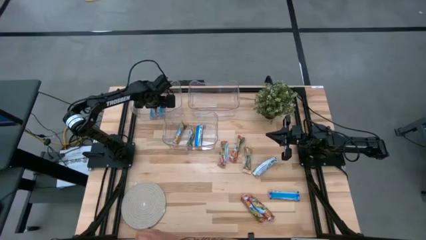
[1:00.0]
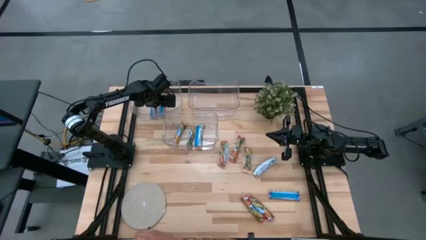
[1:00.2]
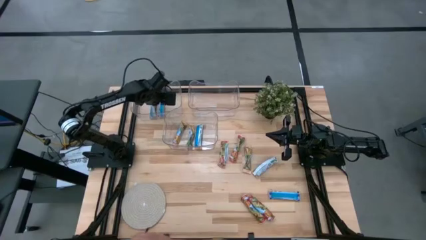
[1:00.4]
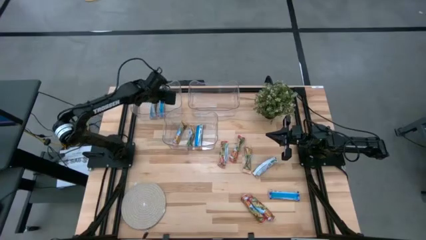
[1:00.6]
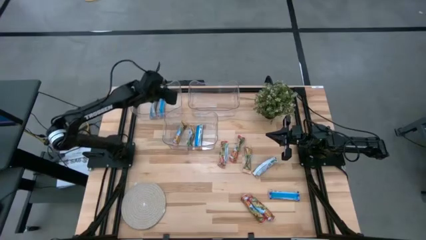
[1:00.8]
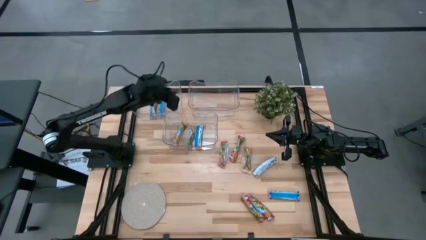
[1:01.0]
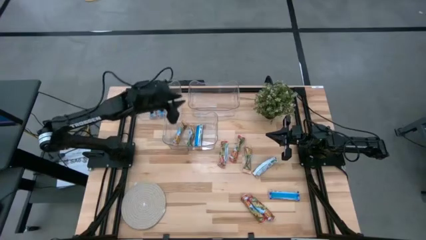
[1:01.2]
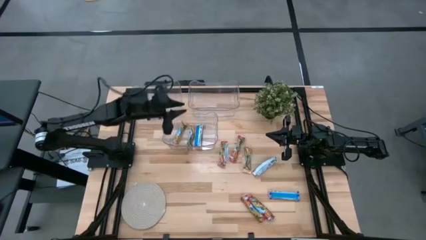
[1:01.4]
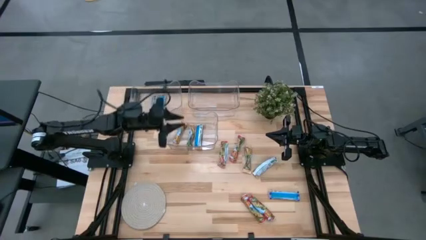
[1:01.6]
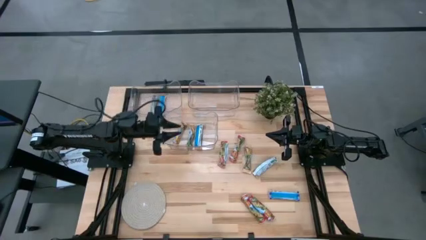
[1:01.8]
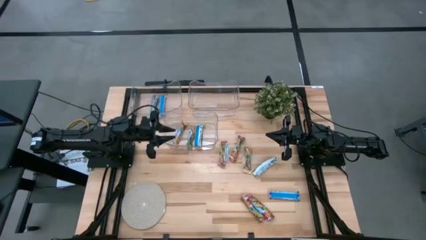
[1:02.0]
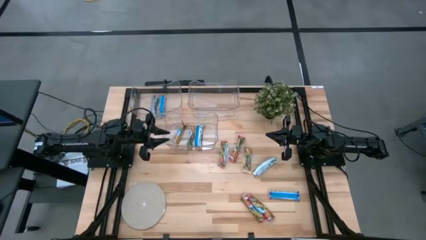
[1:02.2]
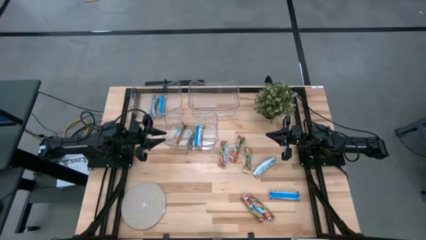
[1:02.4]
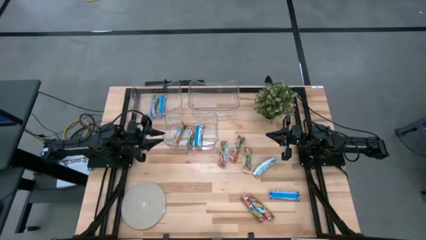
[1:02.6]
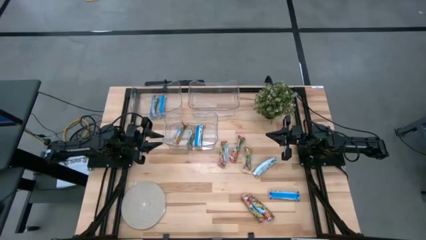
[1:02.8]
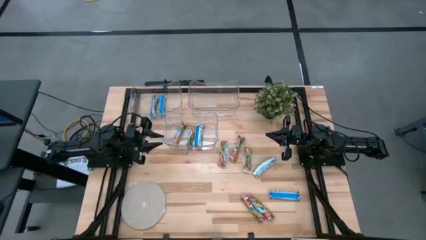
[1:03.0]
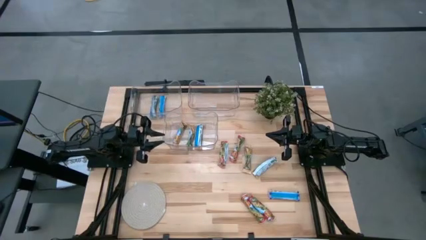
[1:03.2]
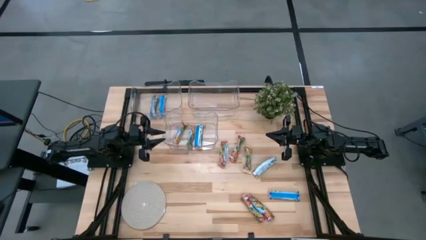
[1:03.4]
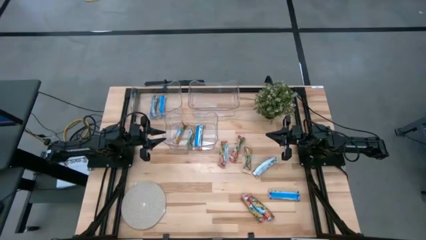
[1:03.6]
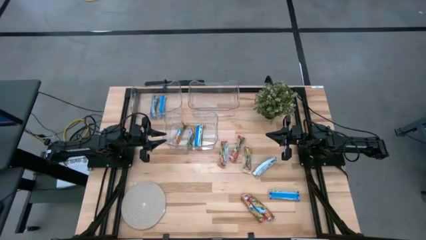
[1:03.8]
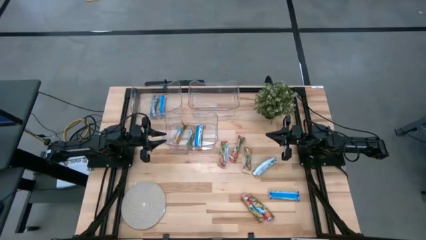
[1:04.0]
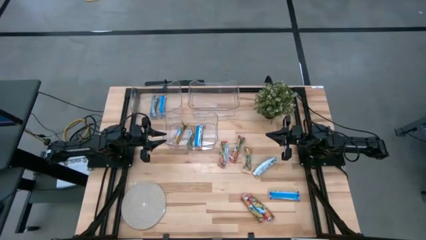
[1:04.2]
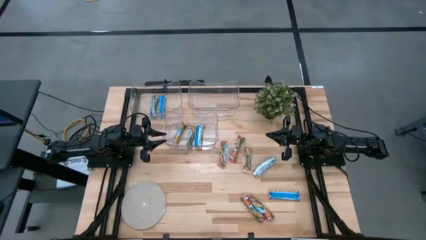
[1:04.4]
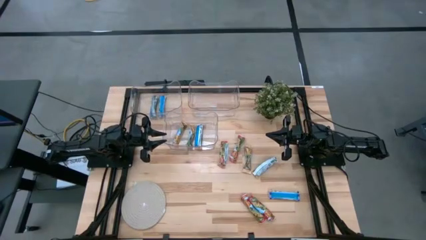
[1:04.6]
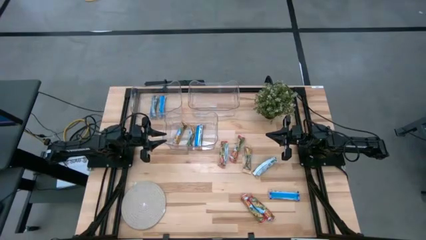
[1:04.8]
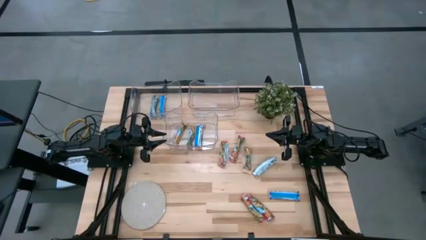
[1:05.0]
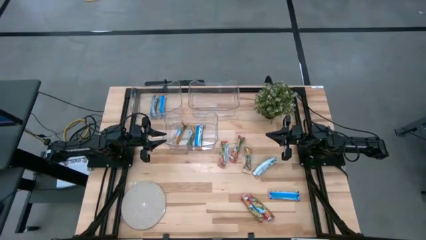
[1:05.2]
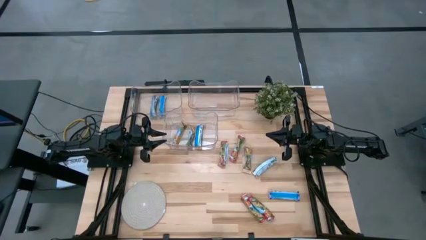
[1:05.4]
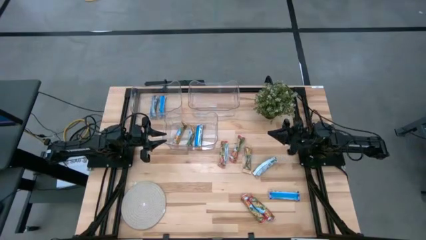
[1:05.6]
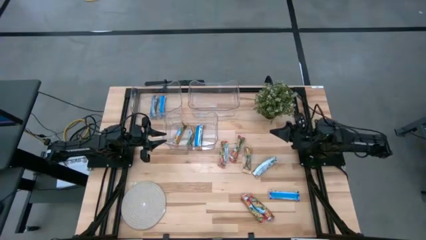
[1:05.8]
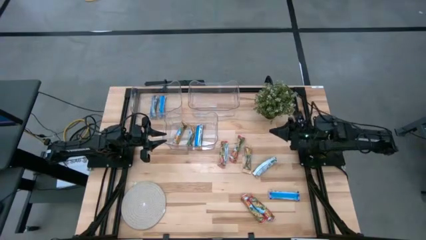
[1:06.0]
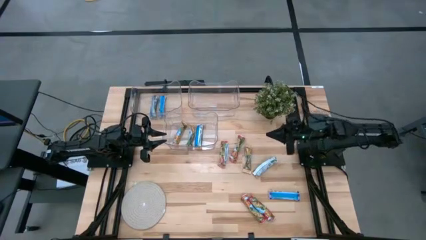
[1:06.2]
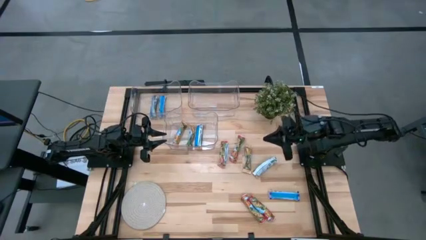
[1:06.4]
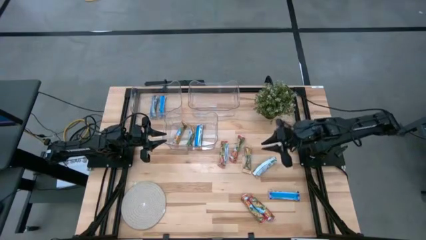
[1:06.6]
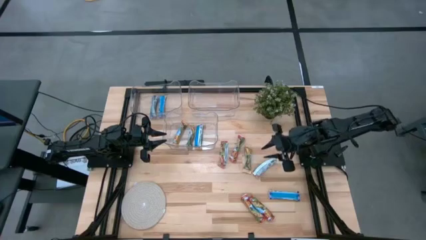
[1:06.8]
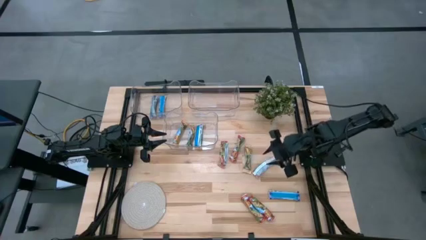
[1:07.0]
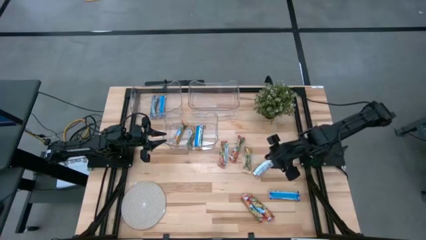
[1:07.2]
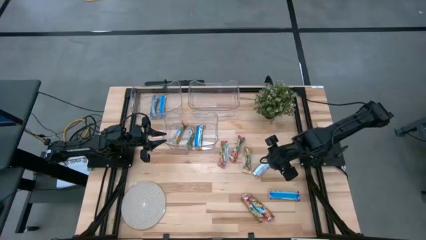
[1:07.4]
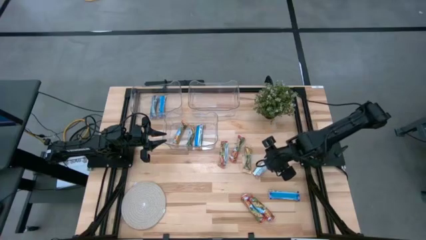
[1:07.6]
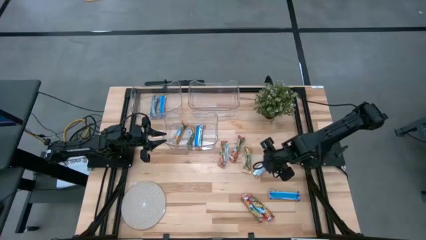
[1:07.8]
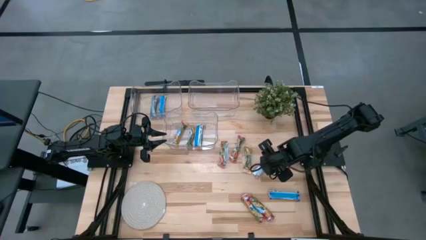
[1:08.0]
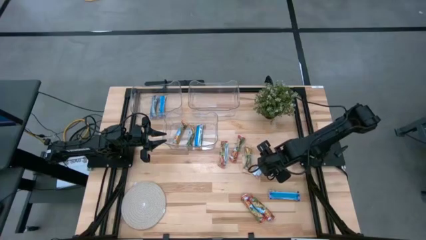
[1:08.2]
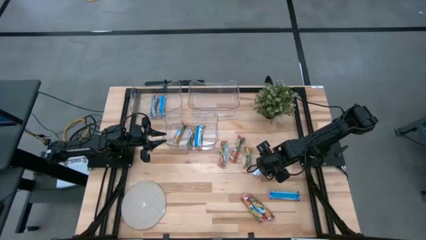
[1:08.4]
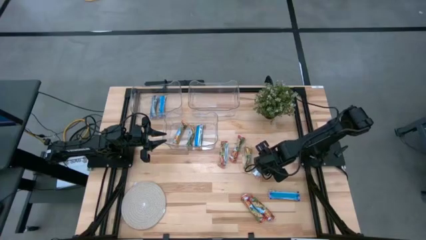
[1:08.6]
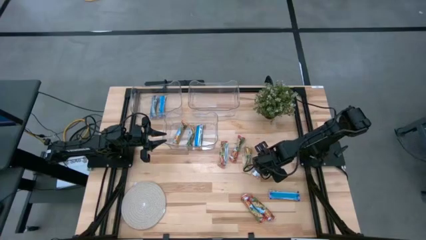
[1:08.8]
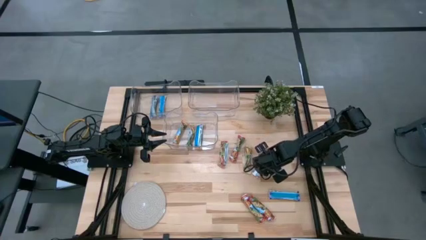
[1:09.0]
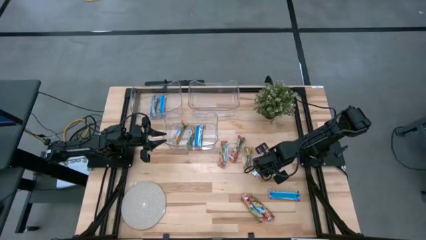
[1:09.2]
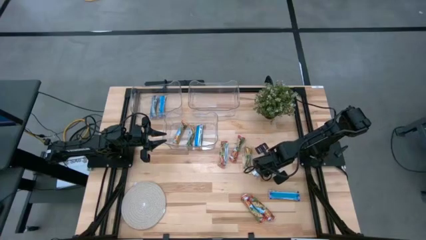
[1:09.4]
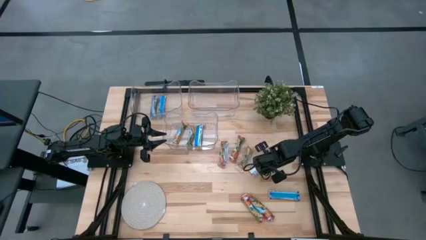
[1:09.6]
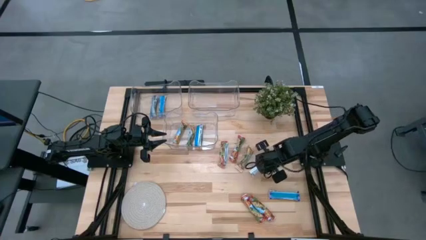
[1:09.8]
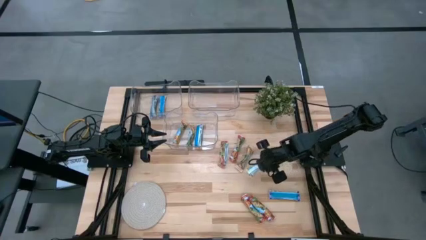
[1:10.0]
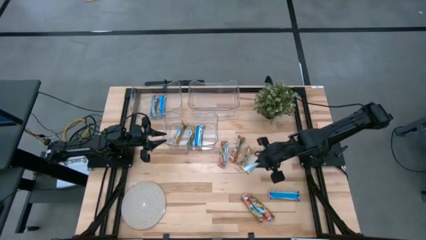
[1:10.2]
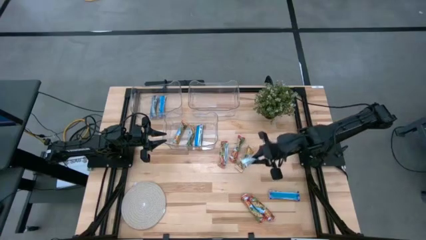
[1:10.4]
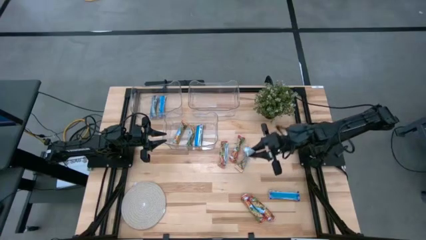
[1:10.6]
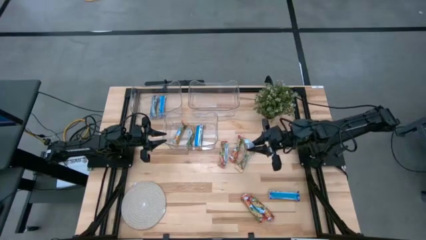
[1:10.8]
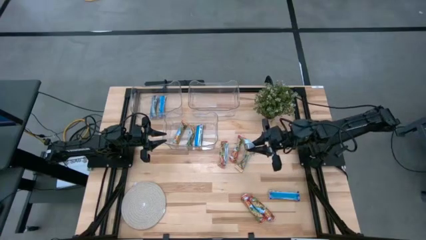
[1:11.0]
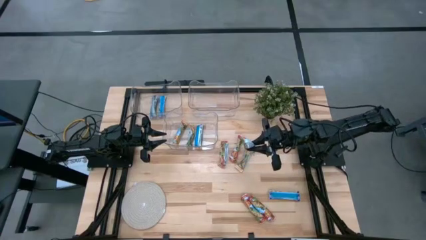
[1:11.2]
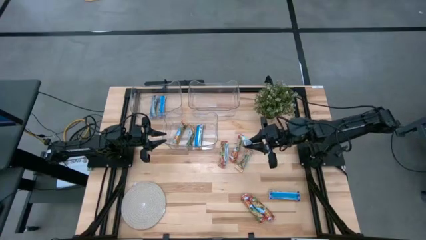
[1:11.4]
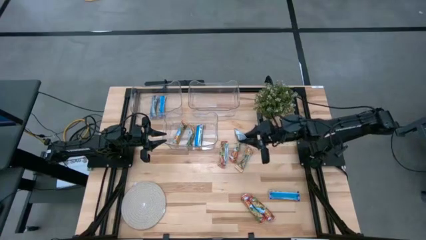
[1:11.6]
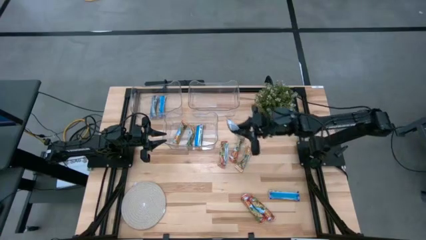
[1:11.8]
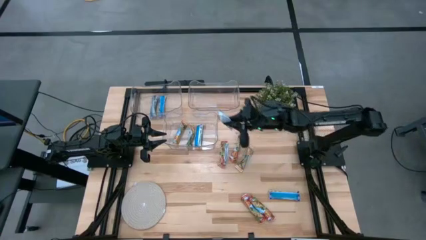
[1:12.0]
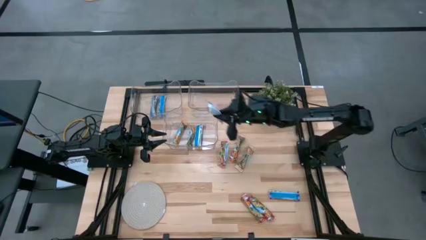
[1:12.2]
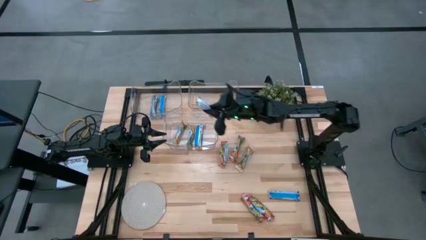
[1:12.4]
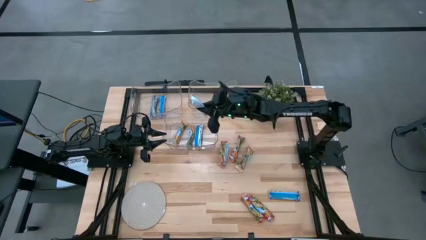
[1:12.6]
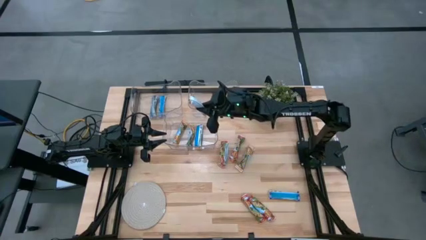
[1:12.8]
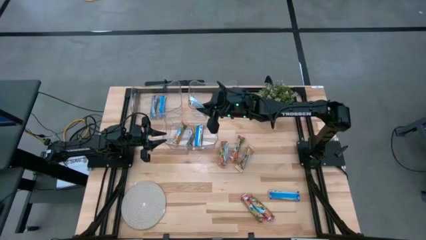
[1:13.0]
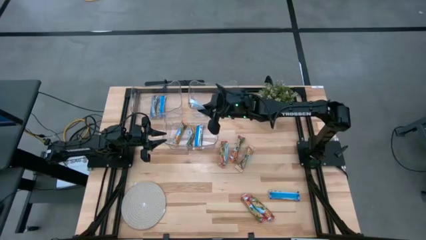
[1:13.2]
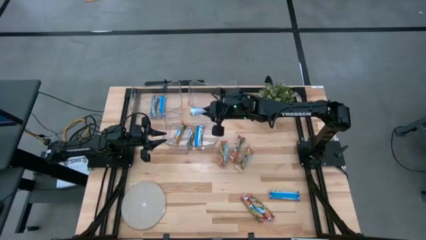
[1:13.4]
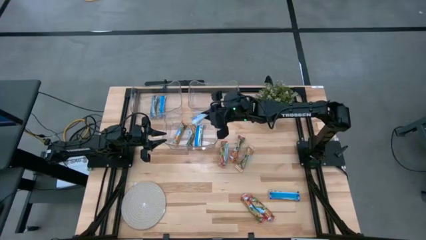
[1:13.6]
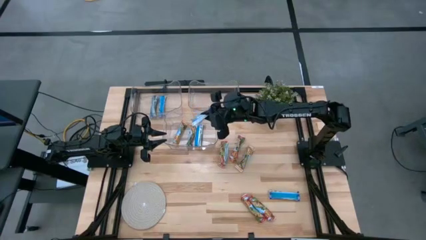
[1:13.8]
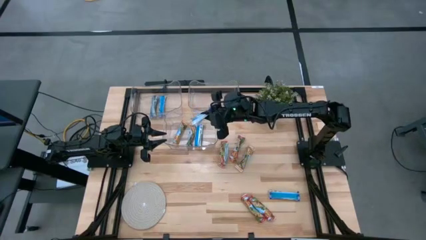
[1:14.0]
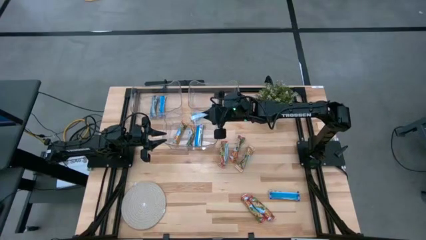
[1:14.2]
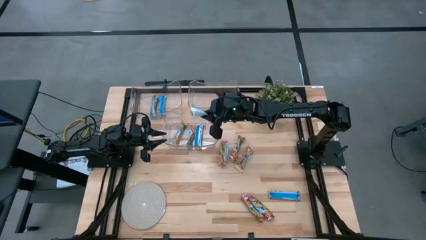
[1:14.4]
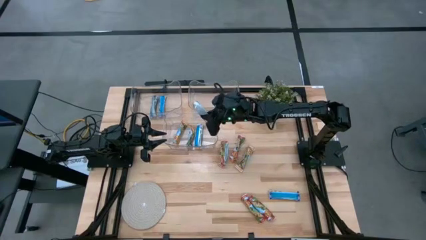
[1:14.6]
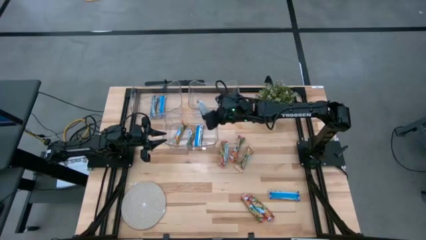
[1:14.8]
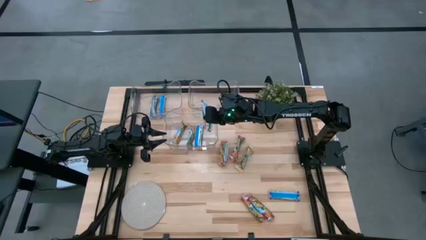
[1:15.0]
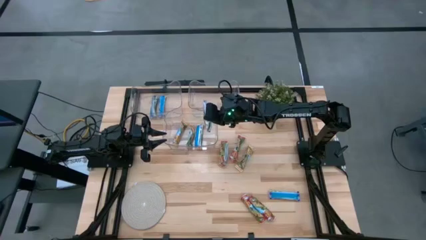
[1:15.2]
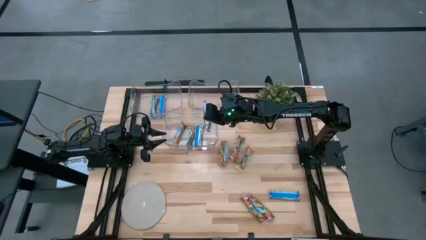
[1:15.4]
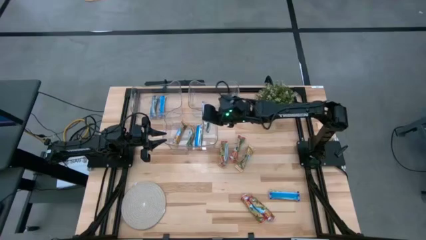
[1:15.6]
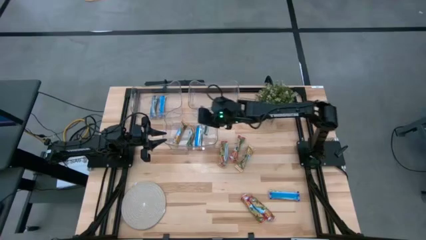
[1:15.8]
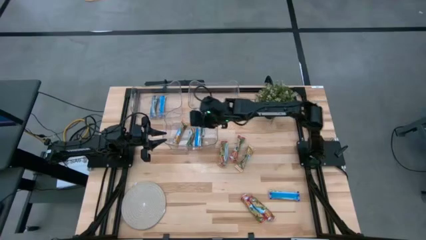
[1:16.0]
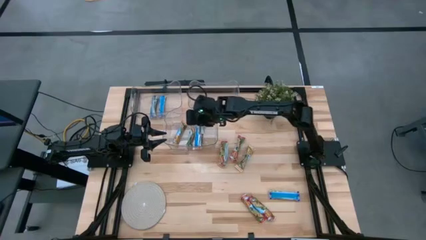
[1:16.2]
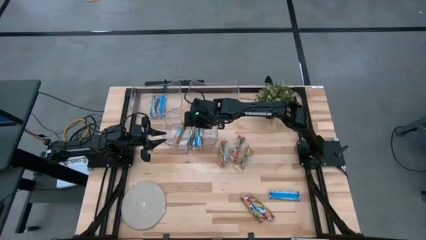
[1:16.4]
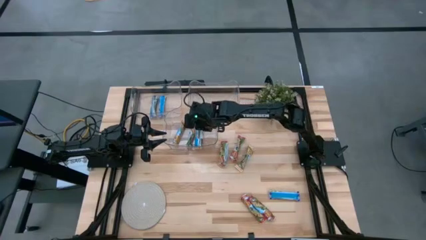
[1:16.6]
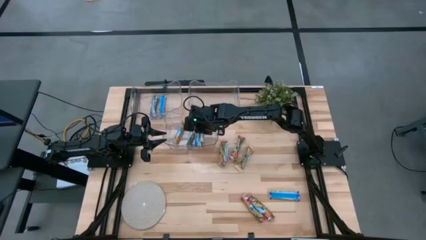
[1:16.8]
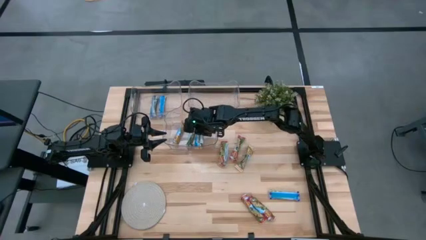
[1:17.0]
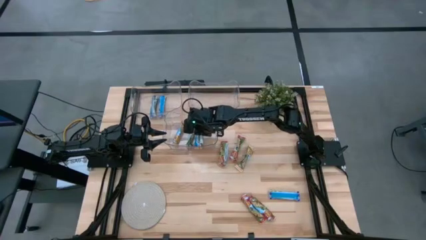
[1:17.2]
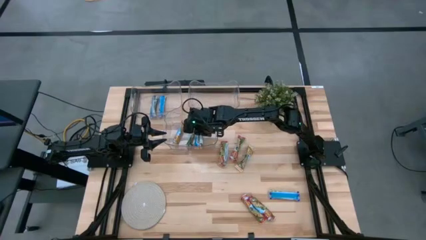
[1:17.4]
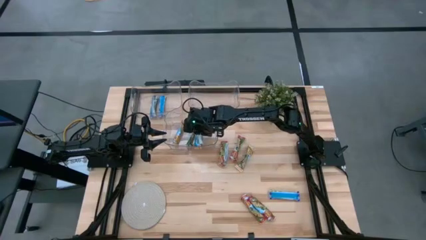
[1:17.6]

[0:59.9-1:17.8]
Task: Pick and place Granola Bars by type
Put the orange granola bar into the bottom transparent bin
